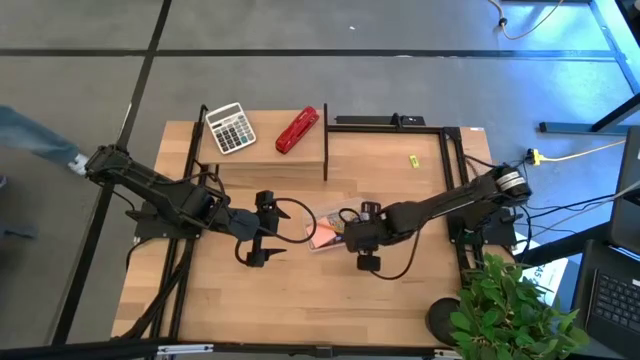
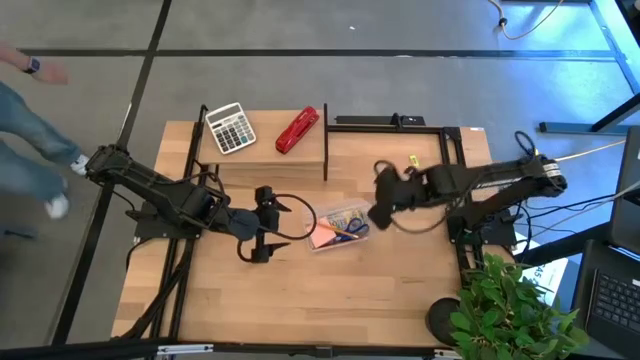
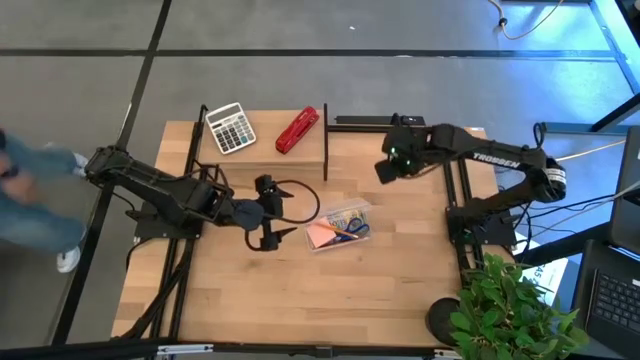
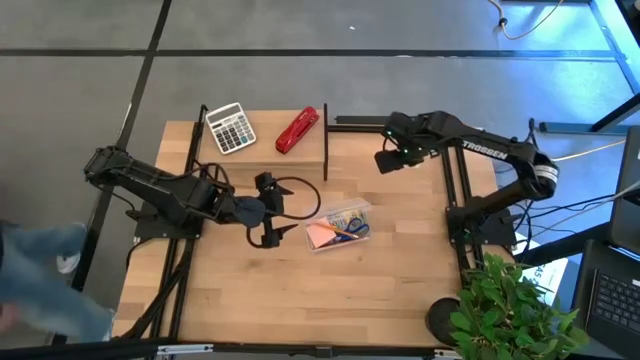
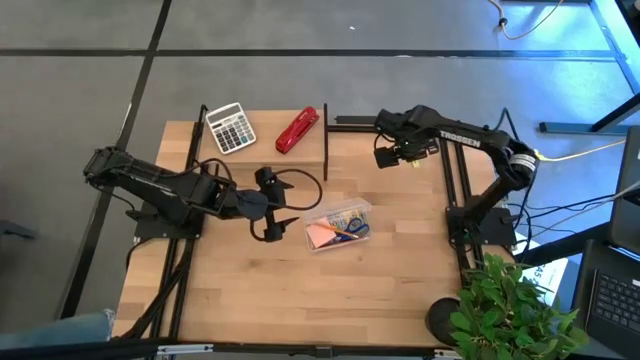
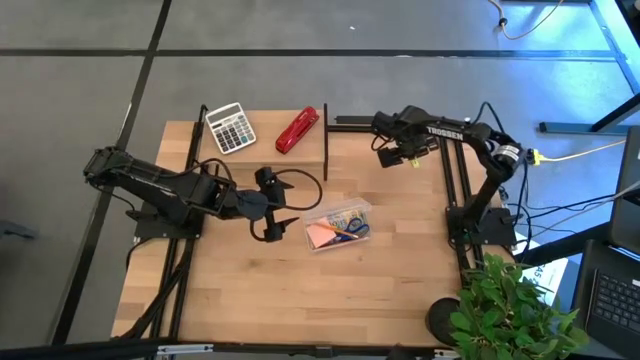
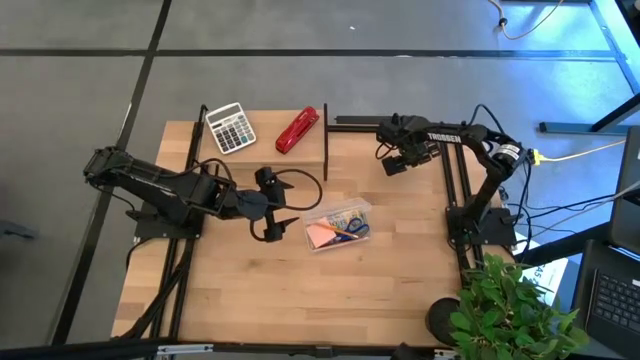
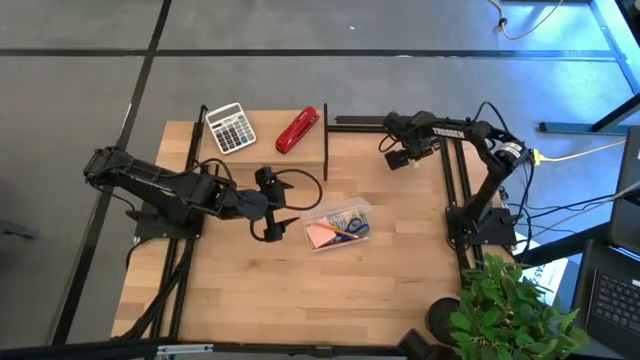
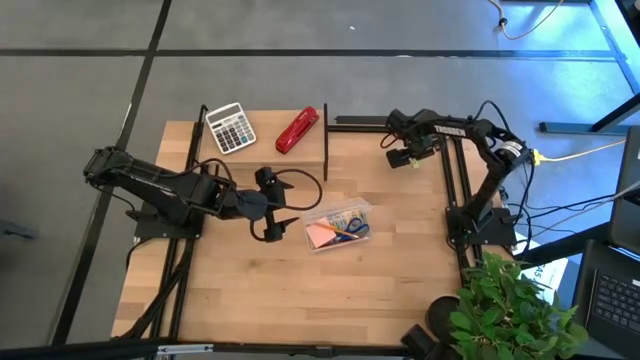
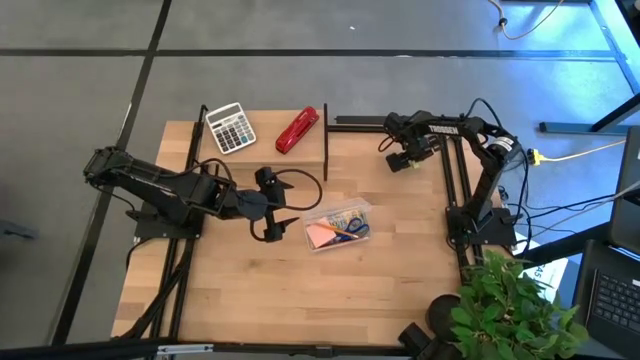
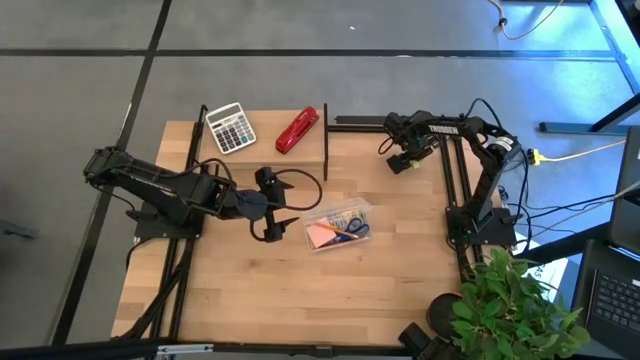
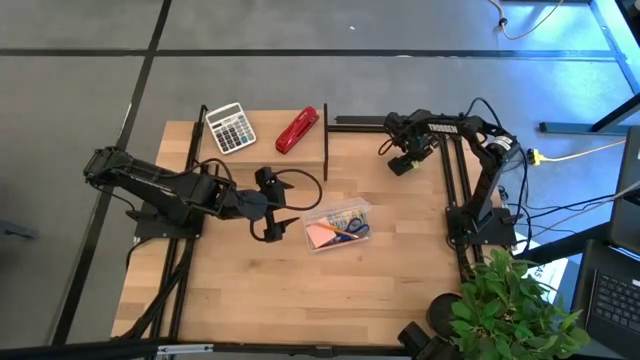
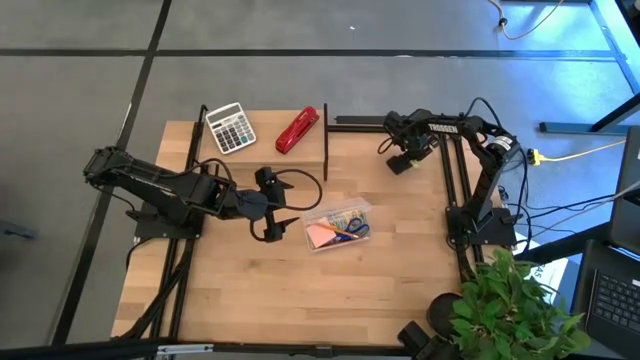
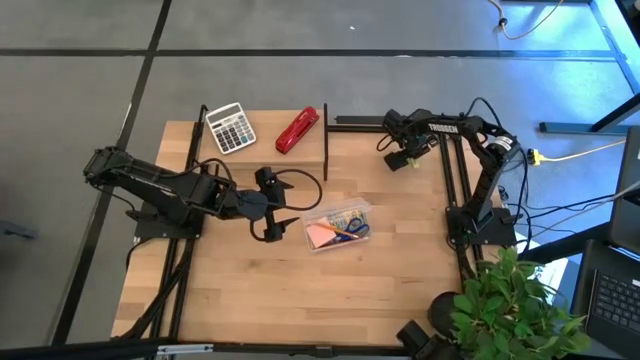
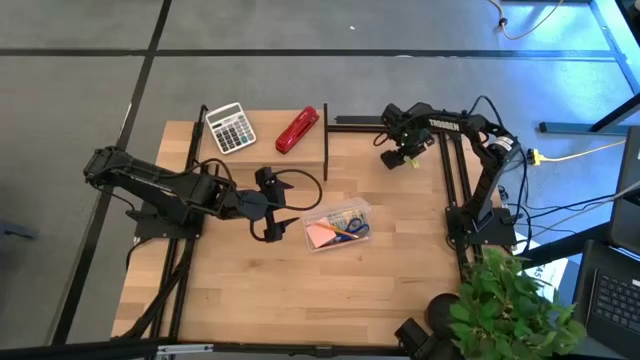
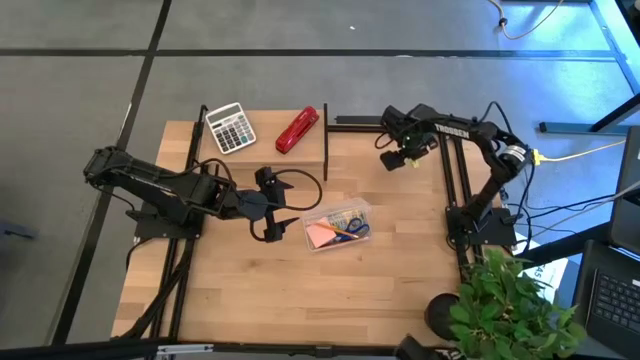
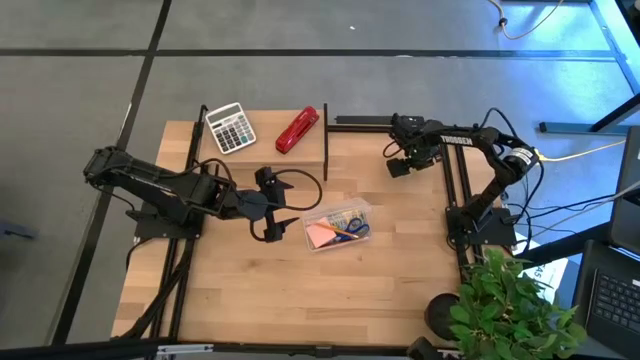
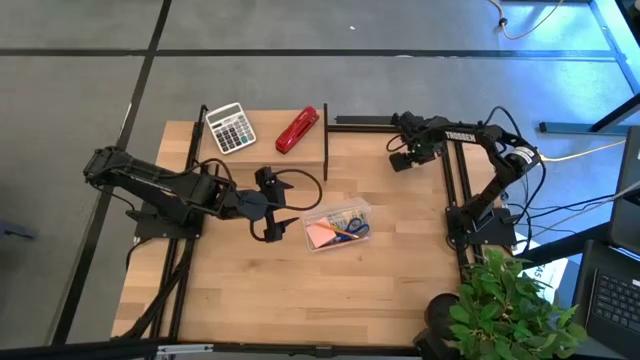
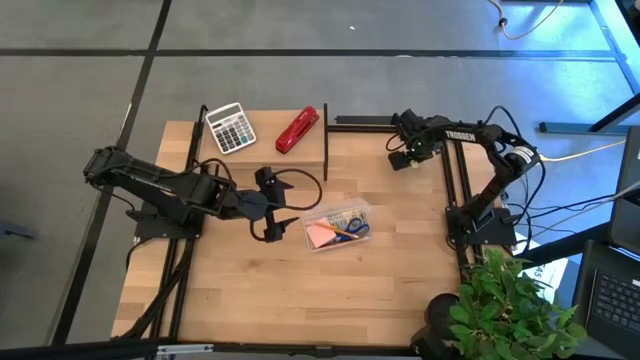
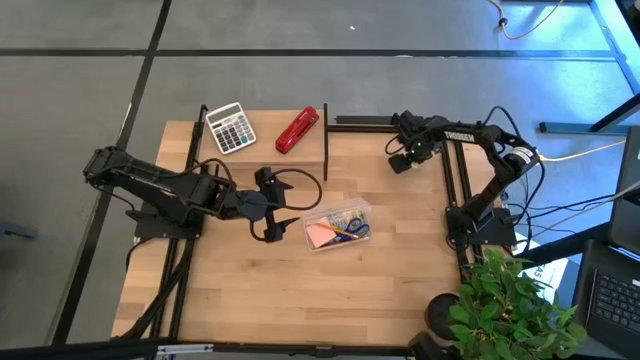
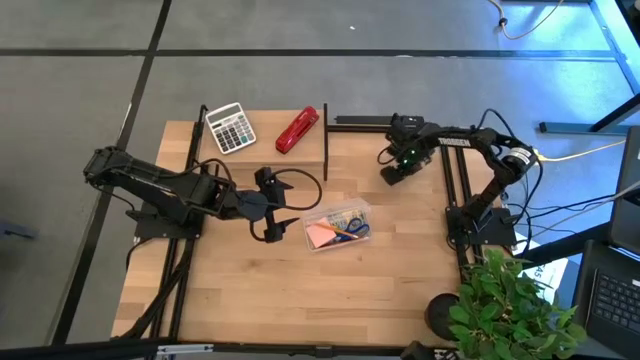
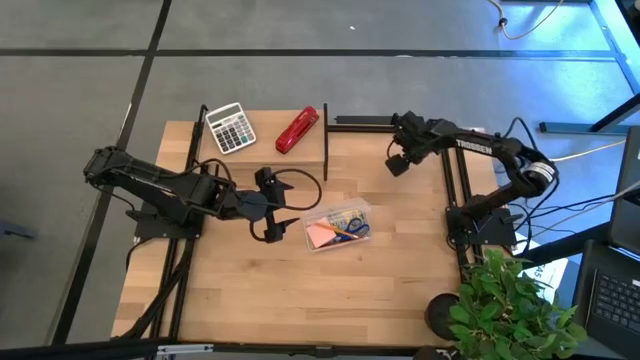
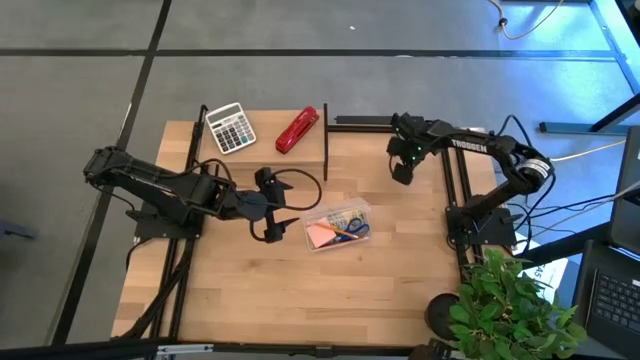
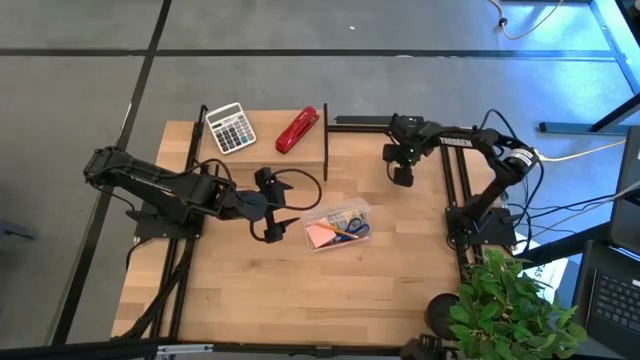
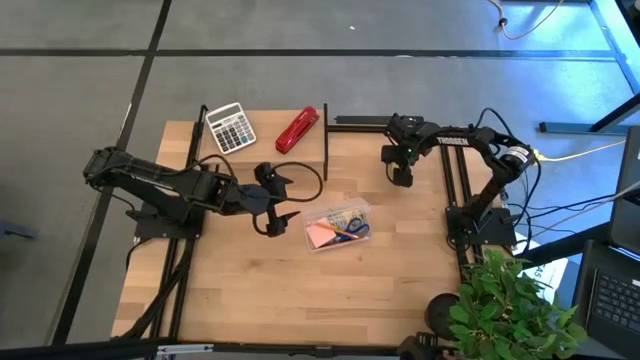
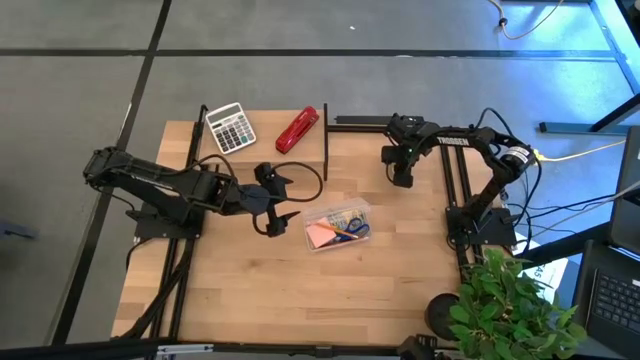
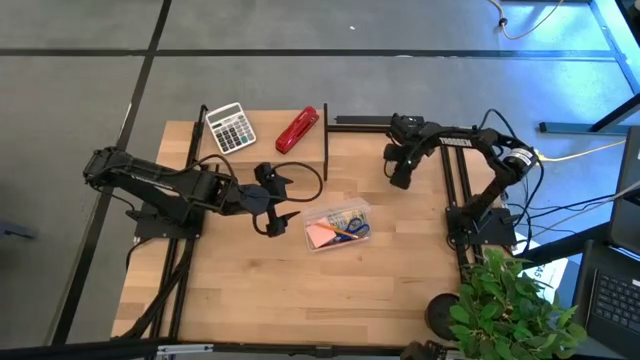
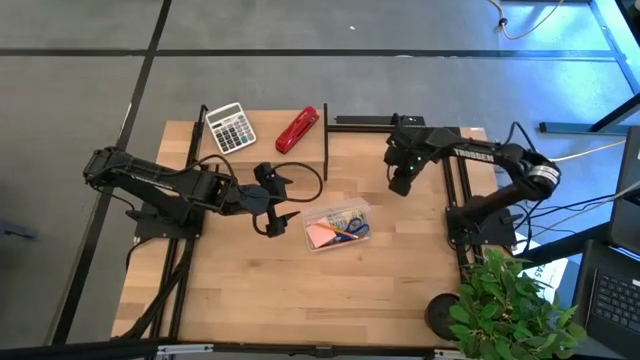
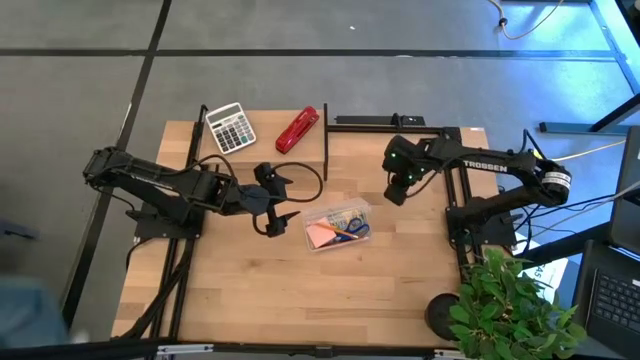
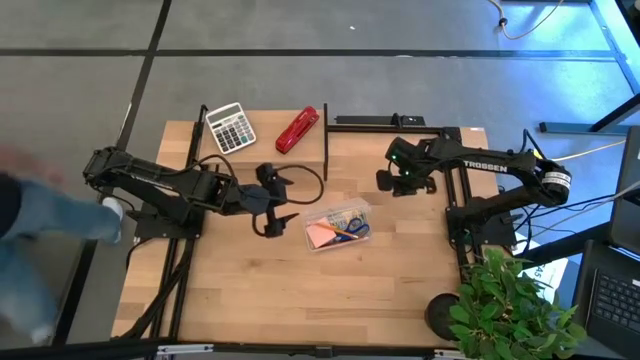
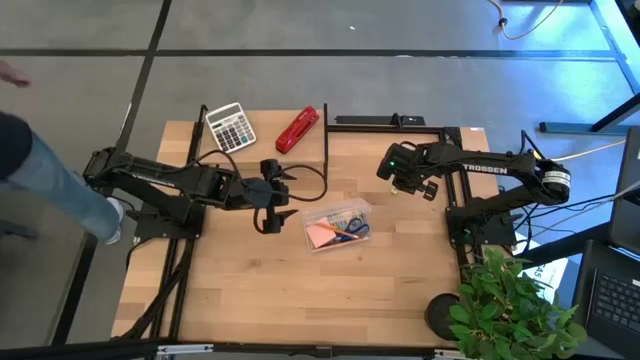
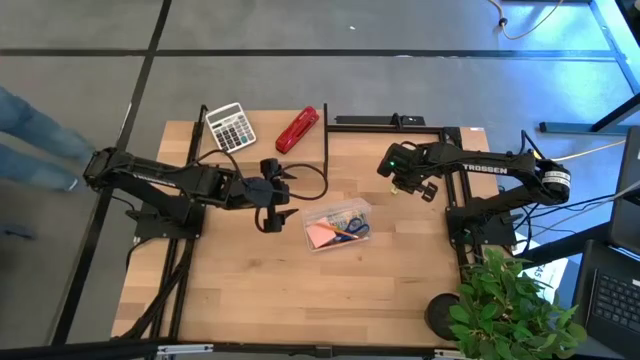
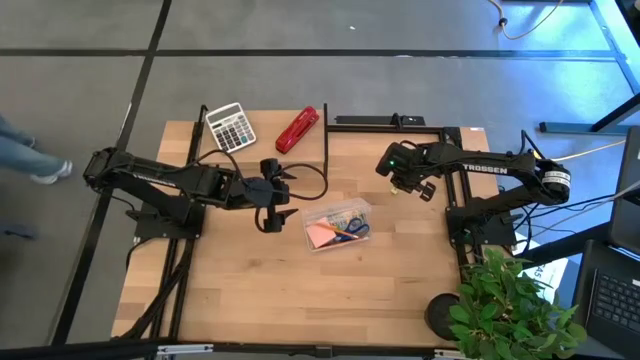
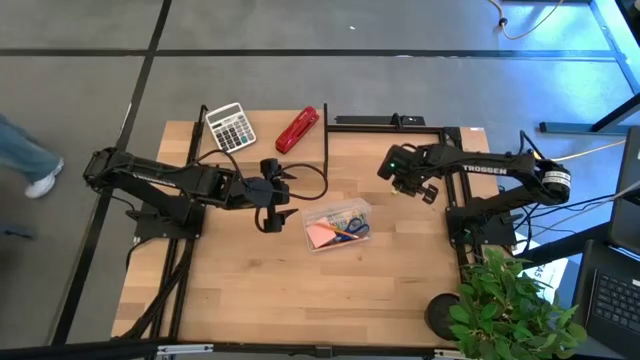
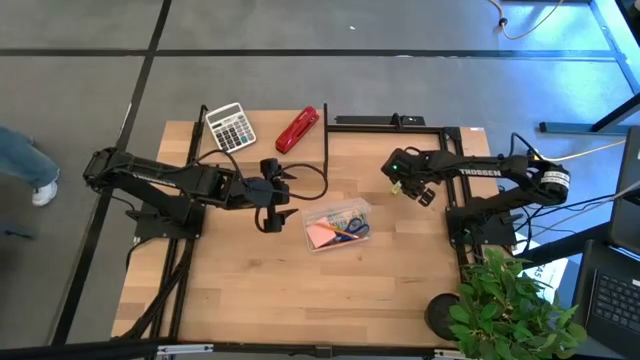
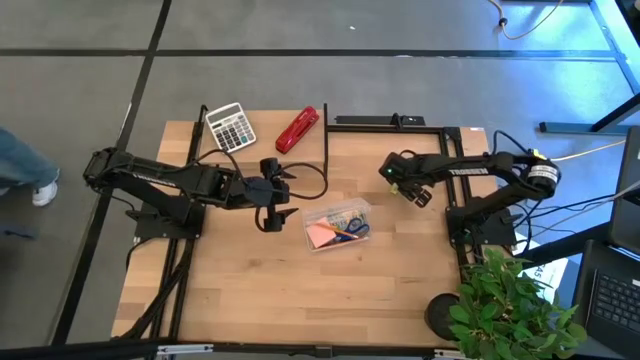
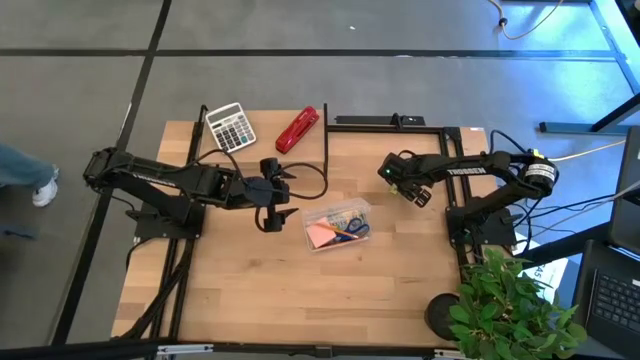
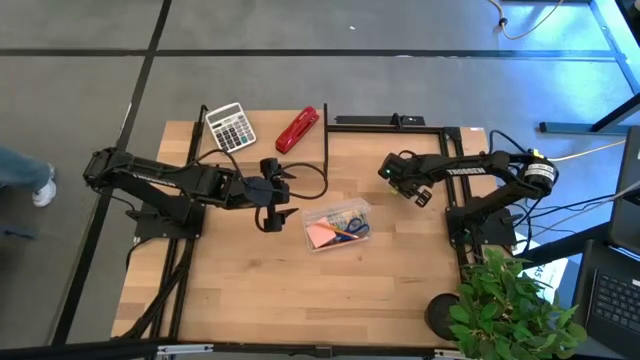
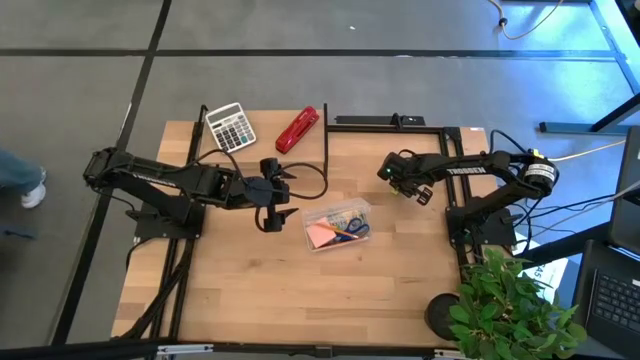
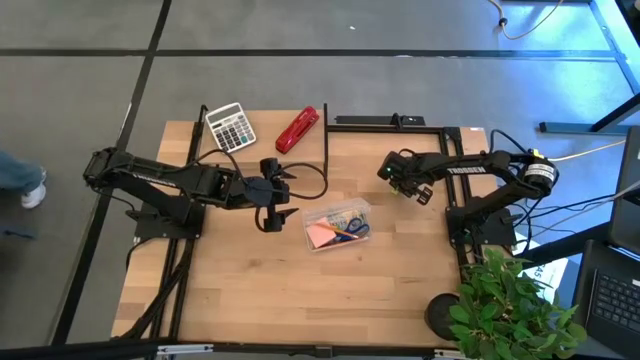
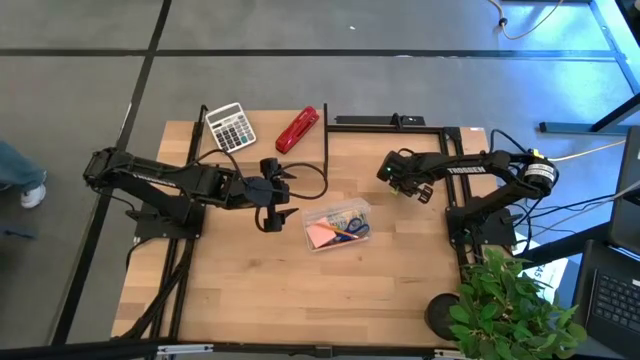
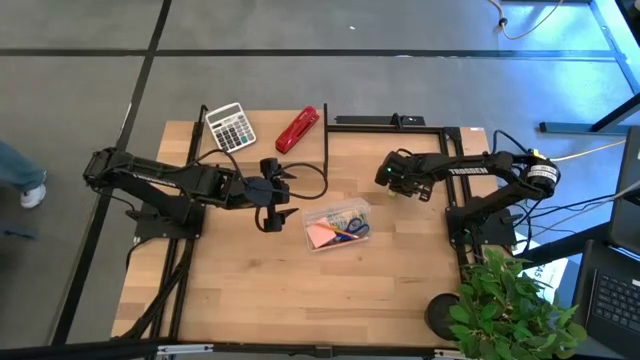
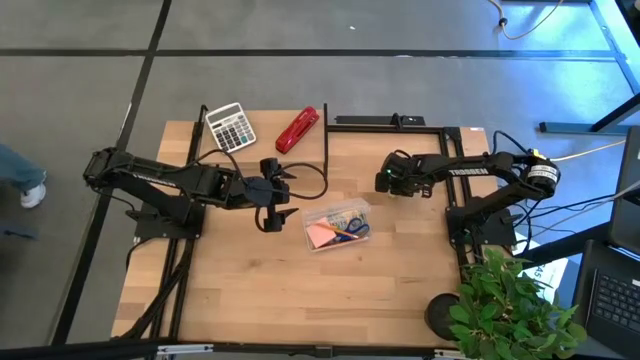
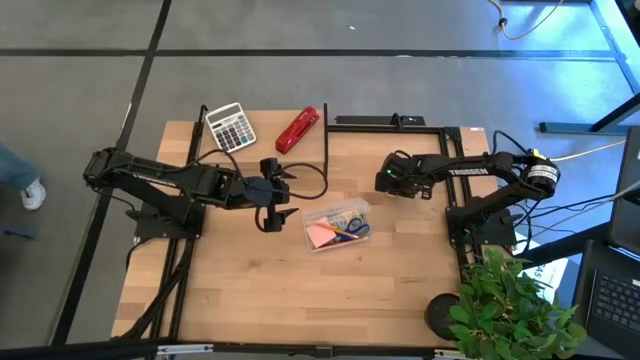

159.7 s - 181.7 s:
Task: Pack school essentials
Put the yellow eraser into the transparent supply box
